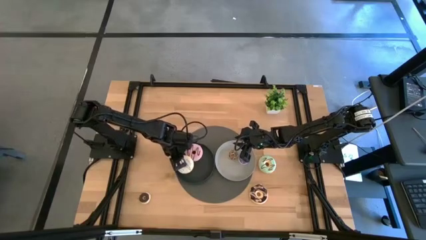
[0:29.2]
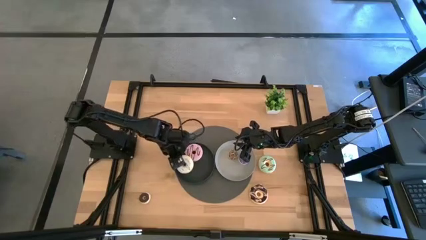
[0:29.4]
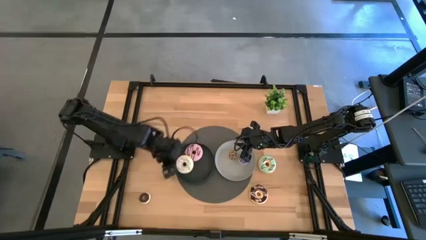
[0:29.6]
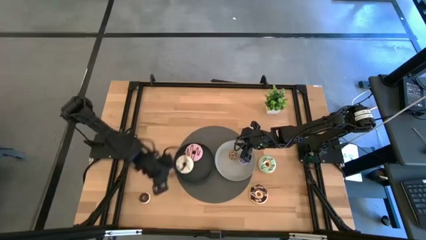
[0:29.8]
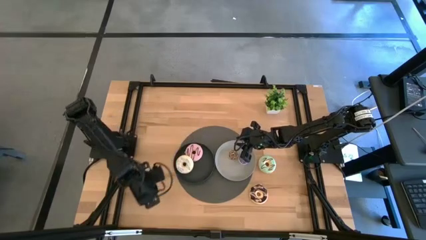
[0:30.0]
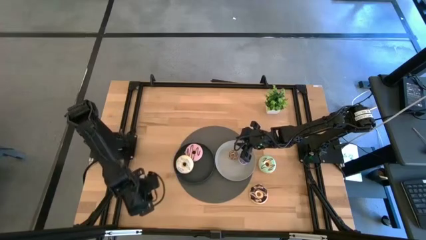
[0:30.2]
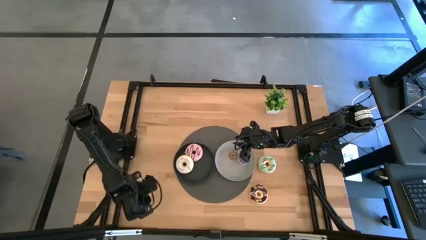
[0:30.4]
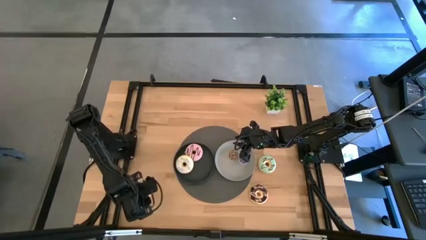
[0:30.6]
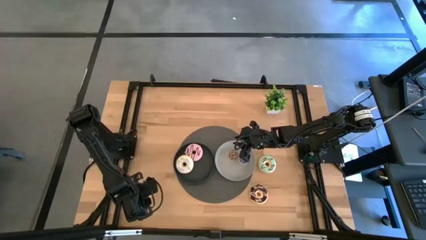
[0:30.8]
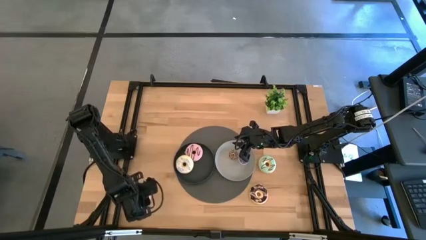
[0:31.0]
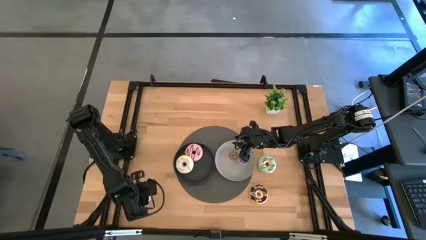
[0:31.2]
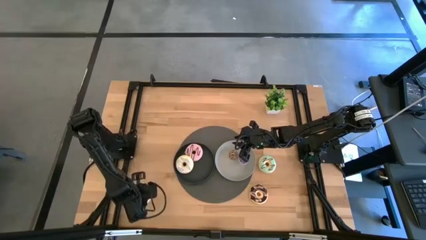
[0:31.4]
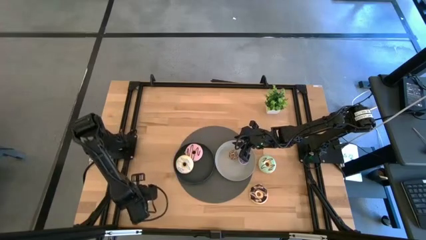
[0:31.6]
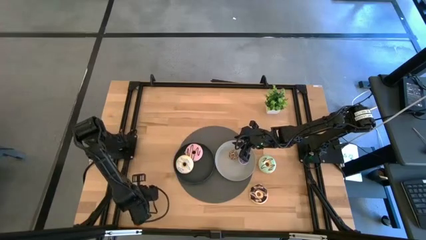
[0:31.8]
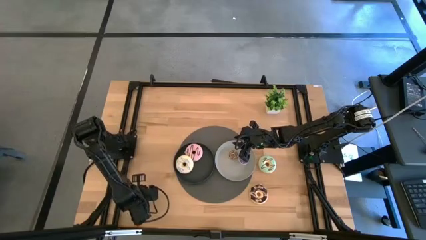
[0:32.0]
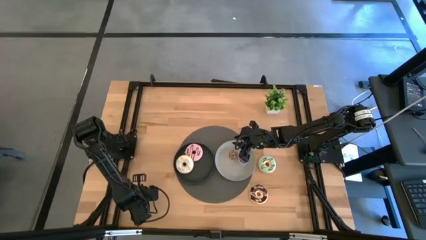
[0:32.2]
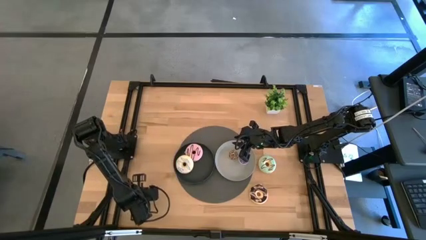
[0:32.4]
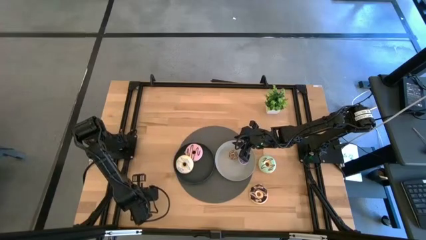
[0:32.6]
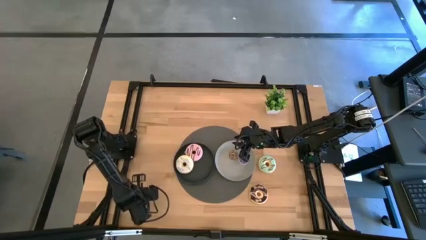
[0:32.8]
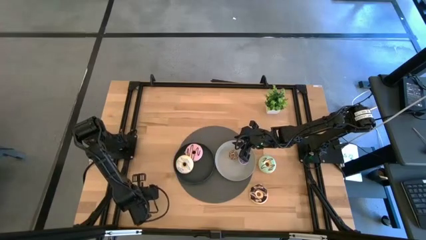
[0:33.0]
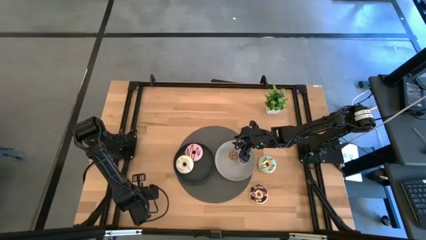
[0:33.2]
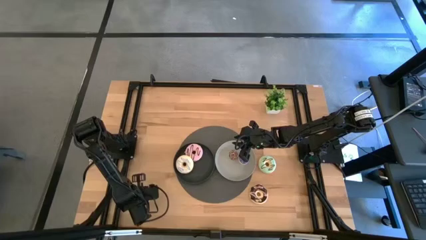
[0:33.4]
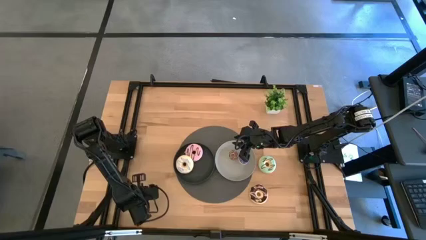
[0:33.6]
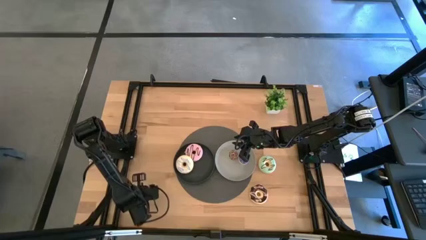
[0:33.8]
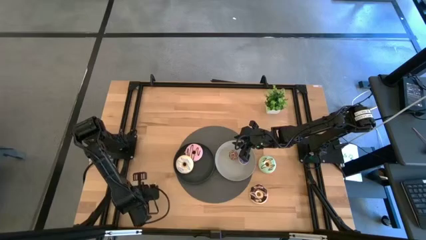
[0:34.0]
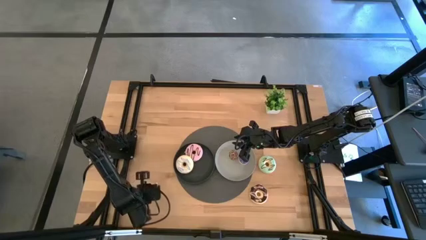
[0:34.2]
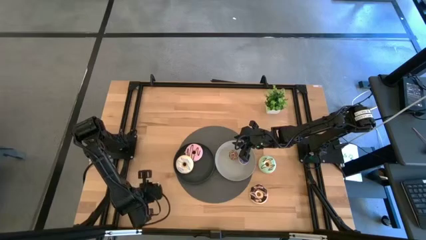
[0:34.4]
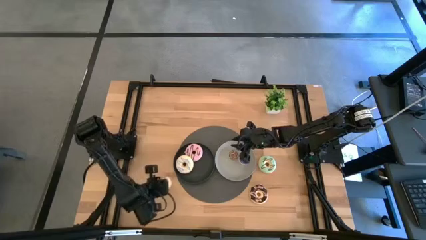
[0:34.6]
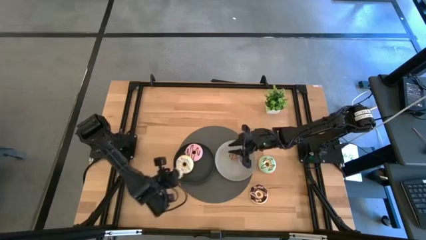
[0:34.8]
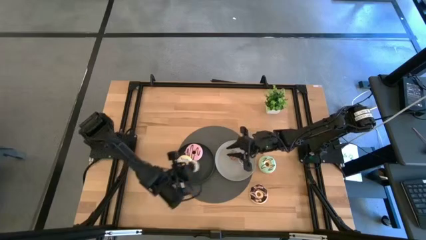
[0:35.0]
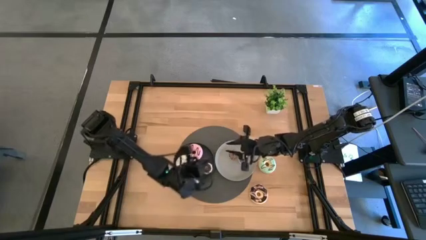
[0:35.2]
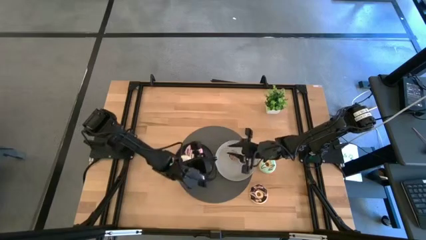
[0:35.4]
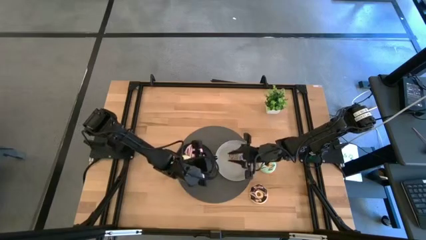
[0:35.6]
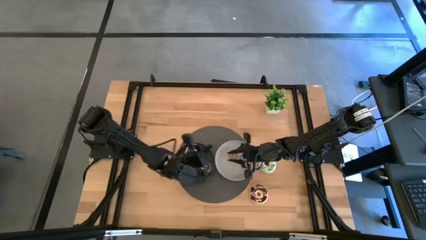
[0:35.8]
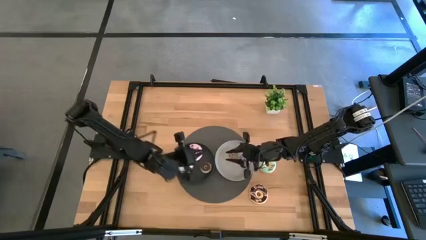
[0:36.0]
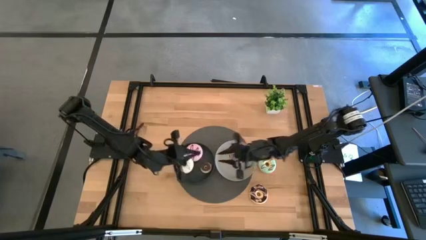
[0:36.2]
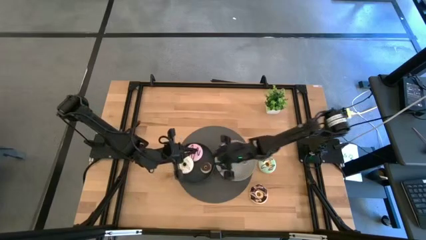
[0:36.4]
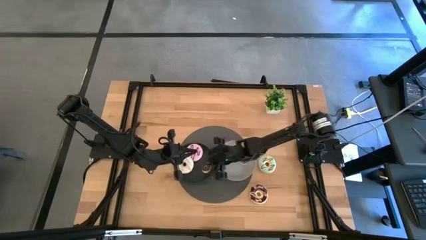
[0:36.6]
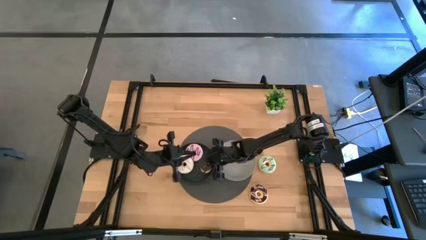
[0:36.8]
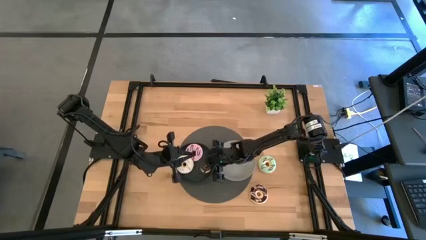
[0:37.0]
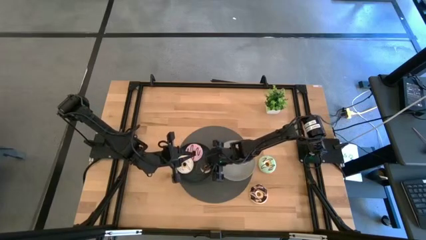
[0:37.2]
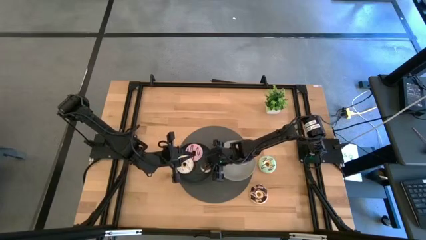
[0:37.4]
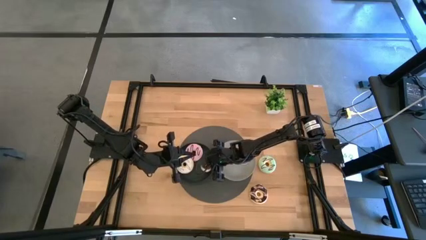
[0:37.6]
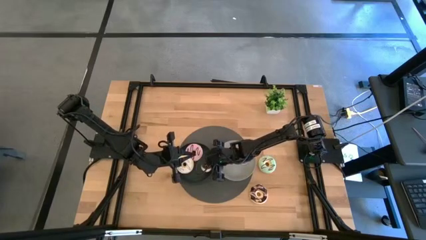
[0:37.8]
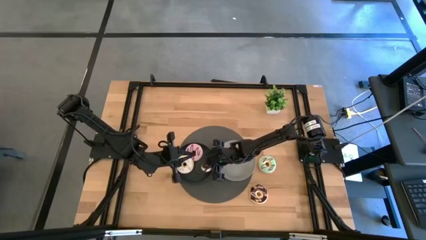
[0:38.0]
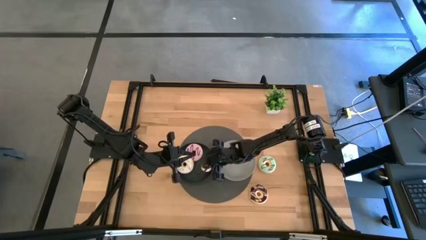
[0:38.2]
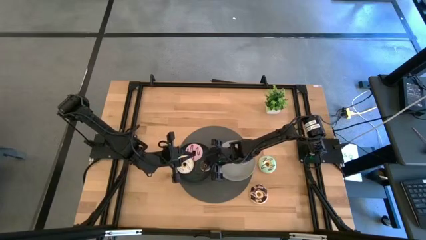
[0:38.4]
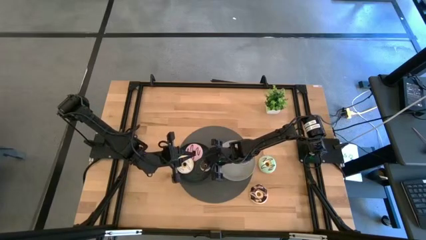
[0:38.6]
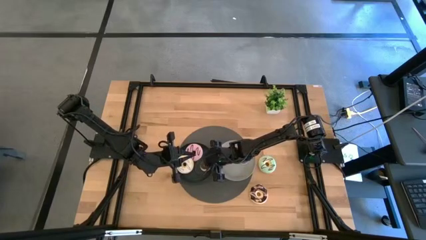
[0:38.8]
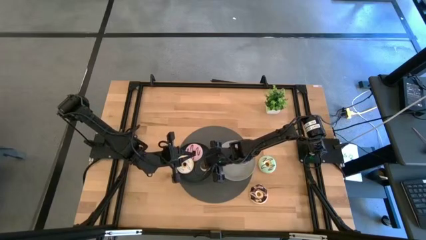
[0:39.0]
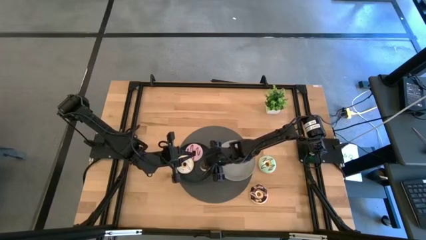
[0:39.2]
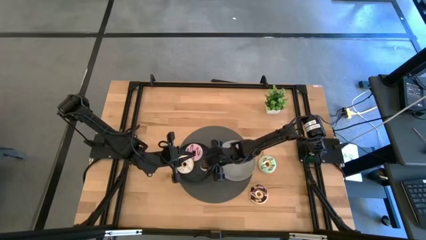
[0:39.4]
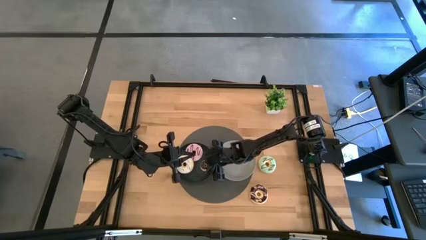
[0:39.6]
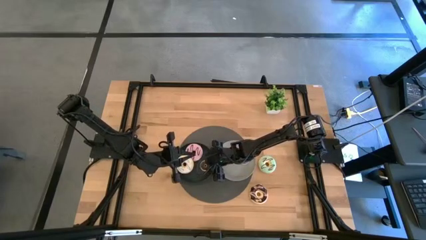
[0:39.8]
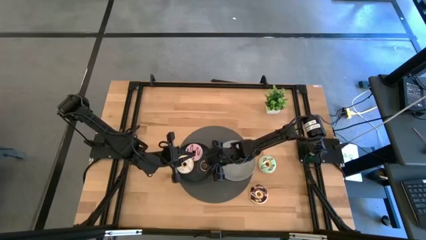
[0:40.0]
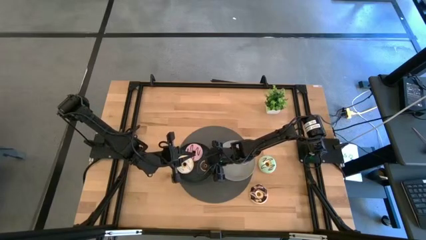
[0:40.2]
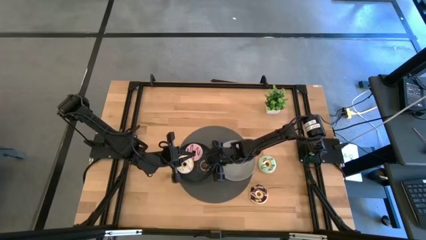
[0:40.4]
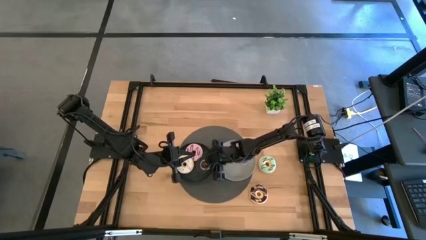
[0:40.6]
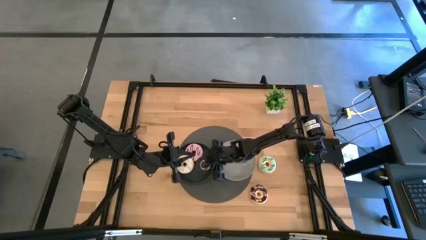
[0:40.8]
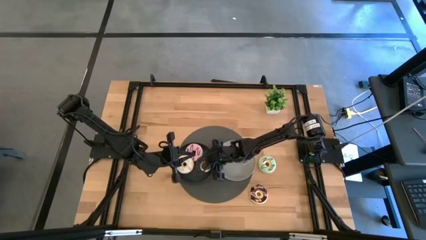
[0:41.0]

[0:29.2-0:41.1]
Task: Pick & Place donuts
Put the small black donut on the gray plate

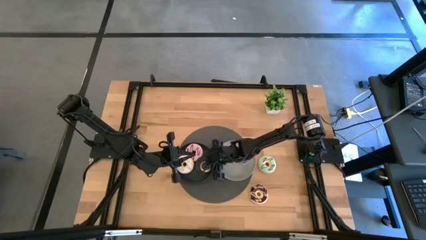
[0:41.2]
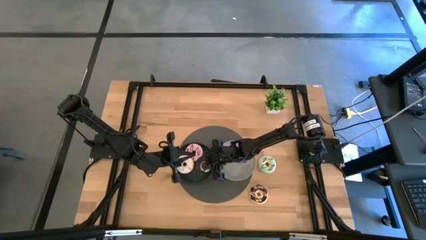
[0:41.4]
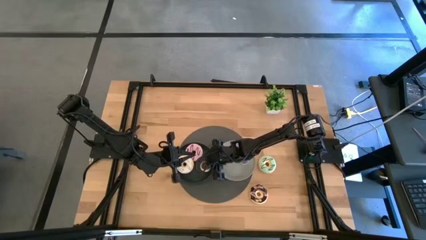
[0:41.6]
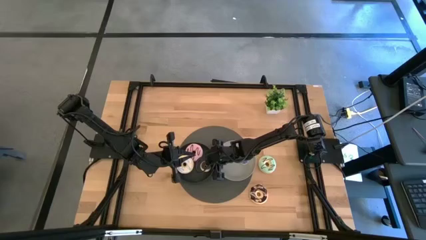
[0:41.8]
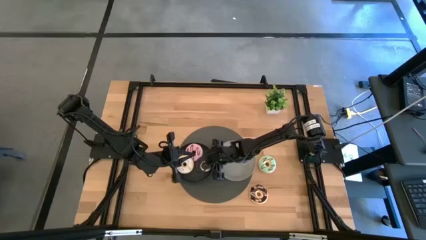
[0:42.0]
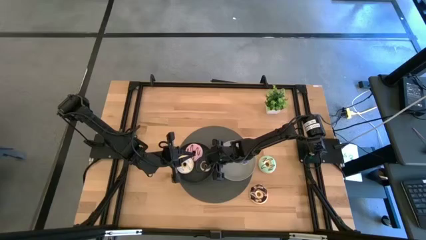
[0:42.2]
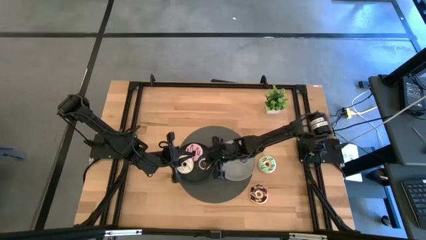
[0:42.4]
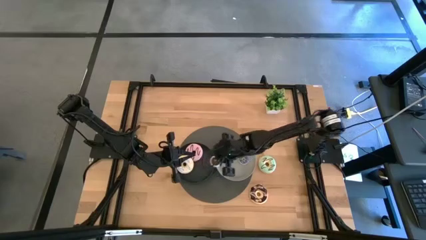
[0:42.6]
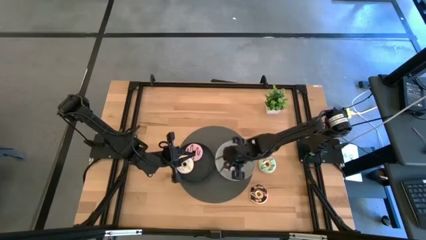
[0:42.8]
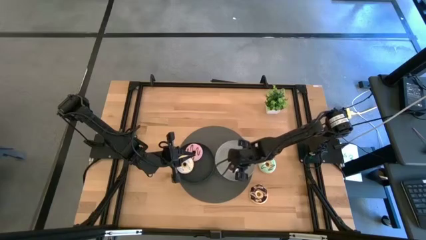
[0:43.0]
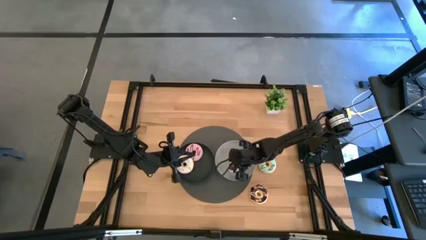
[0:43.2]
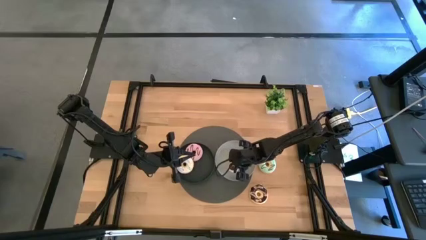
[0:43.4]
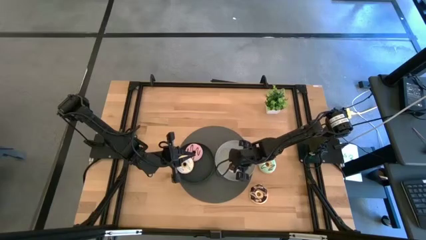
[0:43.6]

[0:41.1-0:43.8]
Put the small black donut on the gray plate

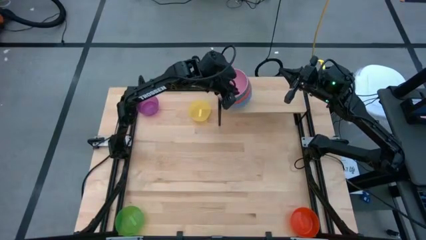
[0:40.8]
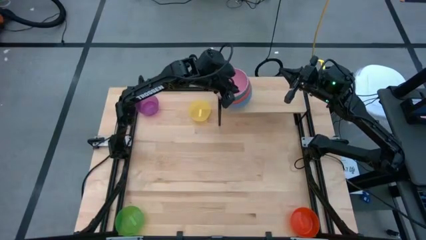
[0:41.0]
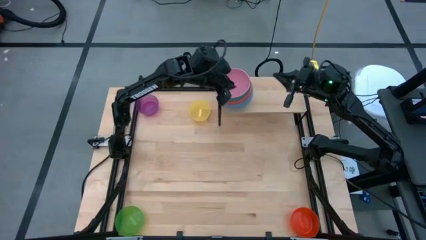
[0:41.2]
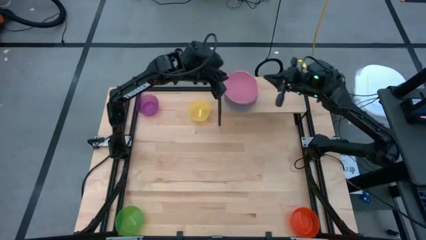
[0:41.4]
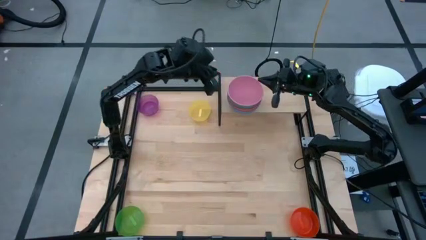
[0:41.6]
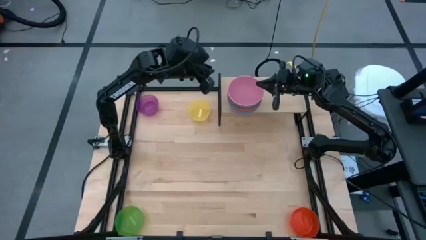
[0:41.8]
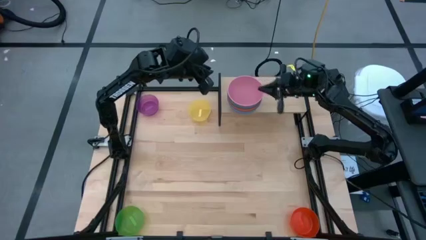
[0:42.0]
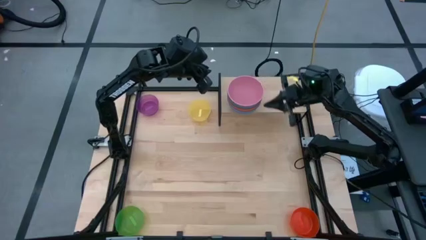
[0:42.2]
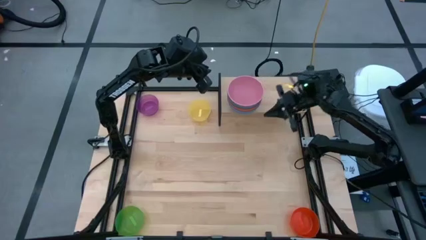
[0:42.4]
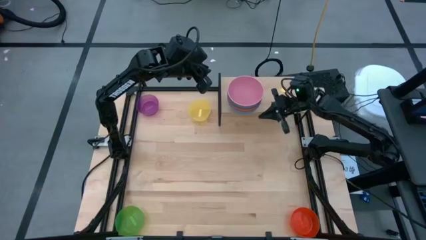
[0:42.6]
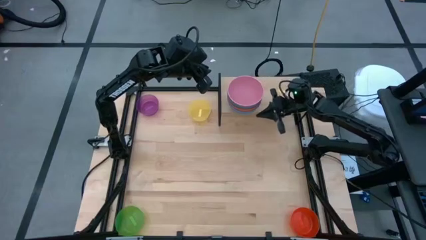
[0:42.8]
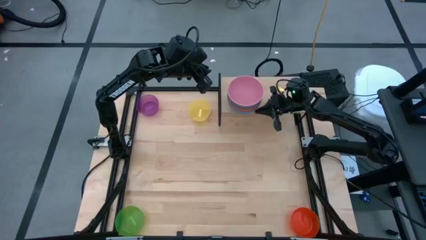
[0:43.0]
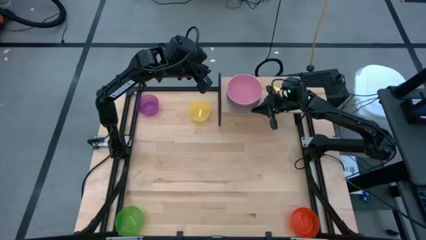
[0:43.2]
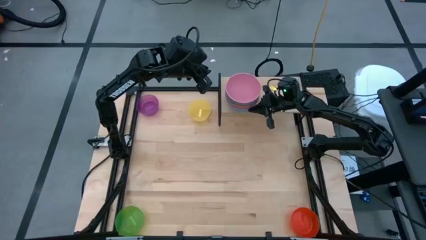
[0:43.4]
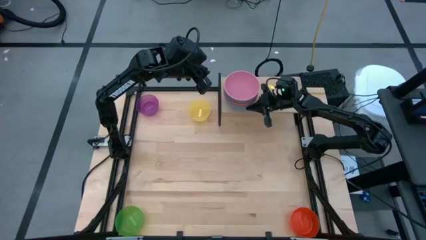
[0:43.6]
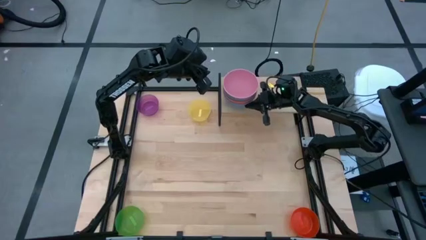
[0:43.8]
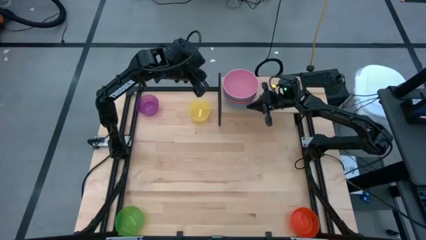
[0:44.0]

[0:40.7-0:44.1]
Task: Place and stack bowls onto a shelf
Put the small orange bowl on the shelf
